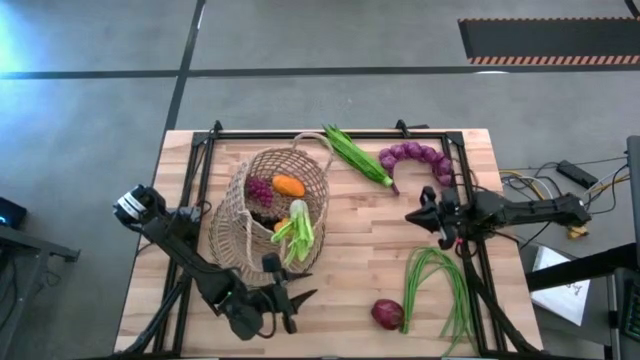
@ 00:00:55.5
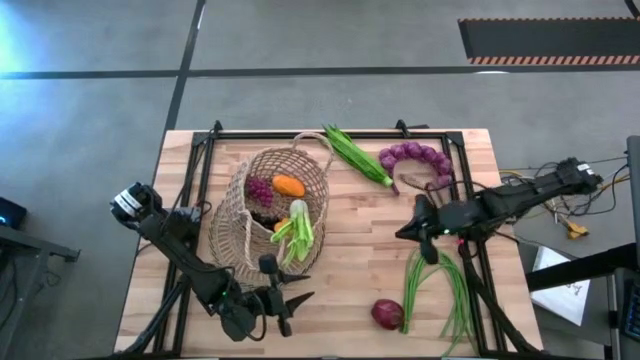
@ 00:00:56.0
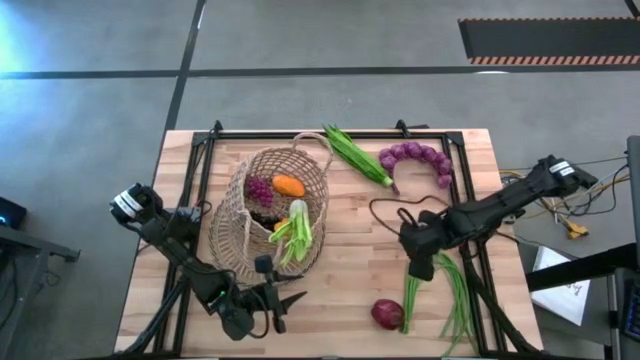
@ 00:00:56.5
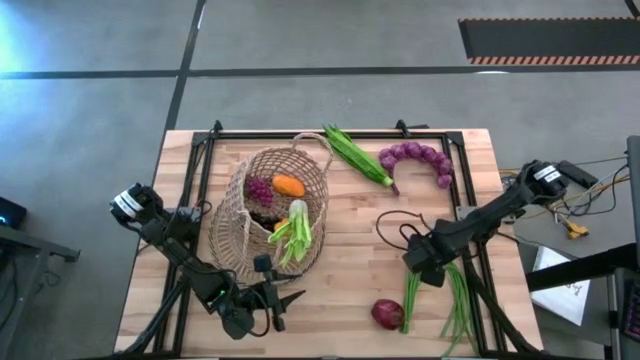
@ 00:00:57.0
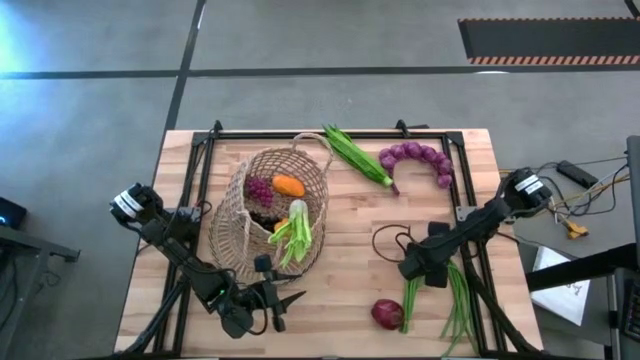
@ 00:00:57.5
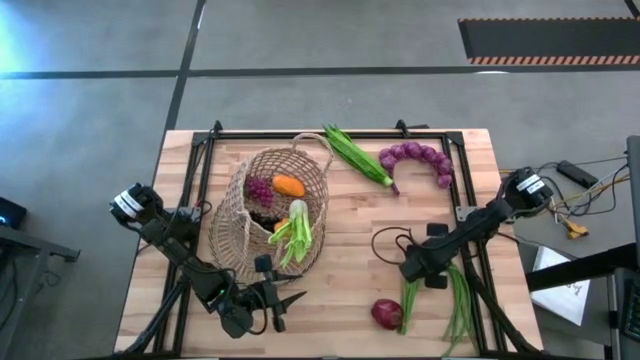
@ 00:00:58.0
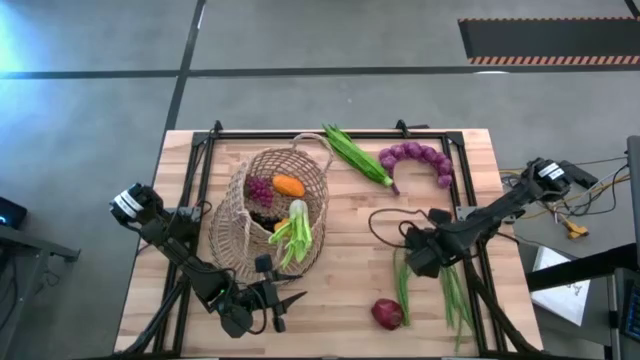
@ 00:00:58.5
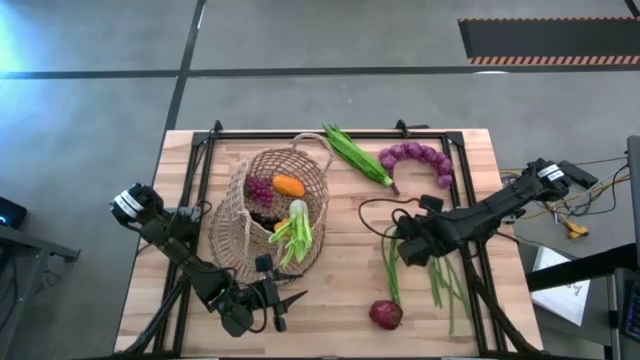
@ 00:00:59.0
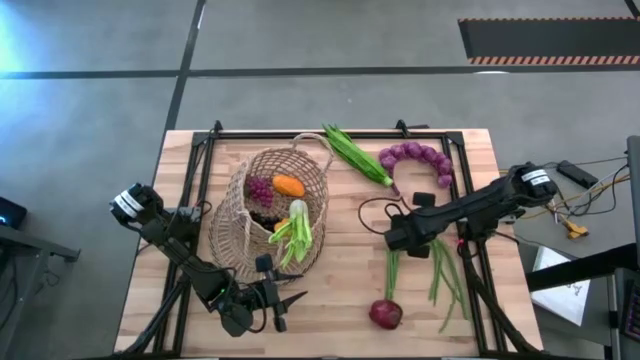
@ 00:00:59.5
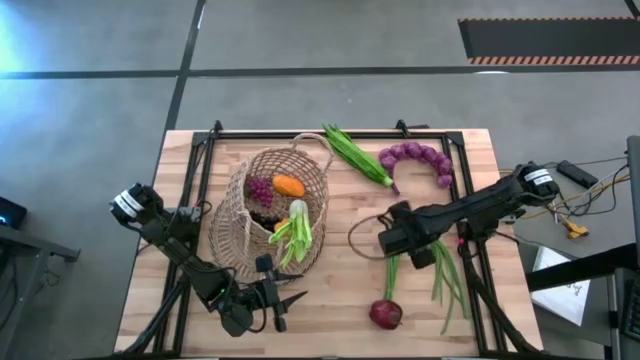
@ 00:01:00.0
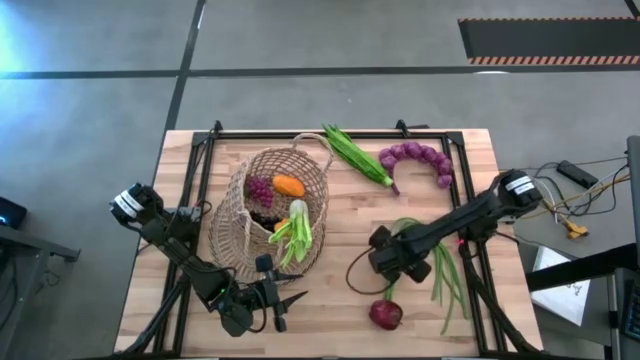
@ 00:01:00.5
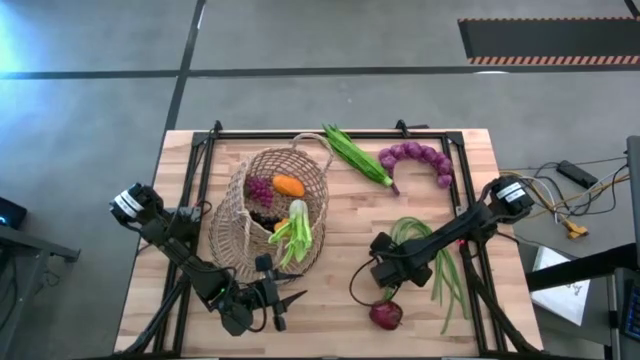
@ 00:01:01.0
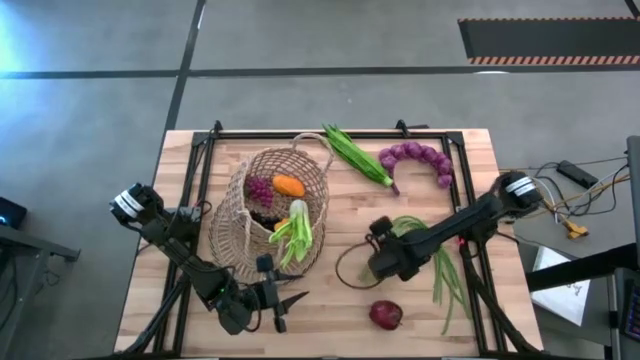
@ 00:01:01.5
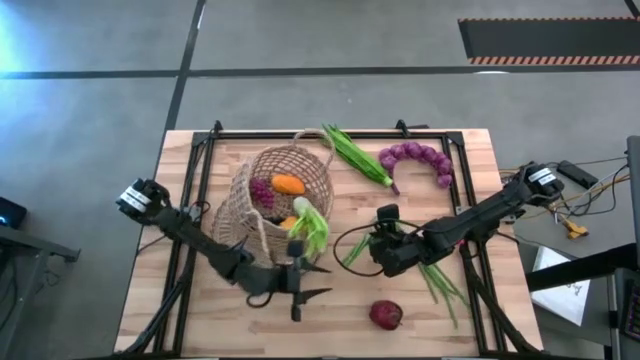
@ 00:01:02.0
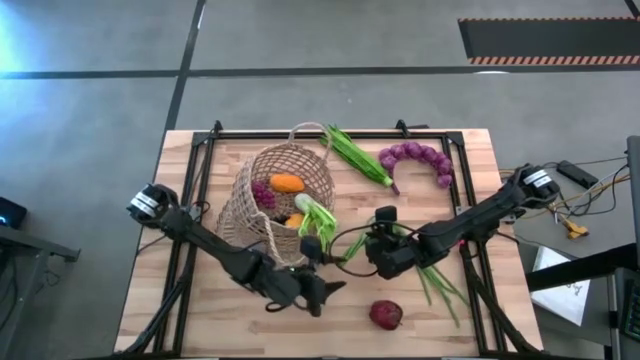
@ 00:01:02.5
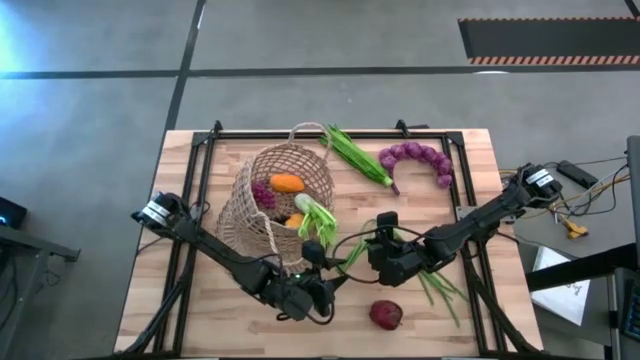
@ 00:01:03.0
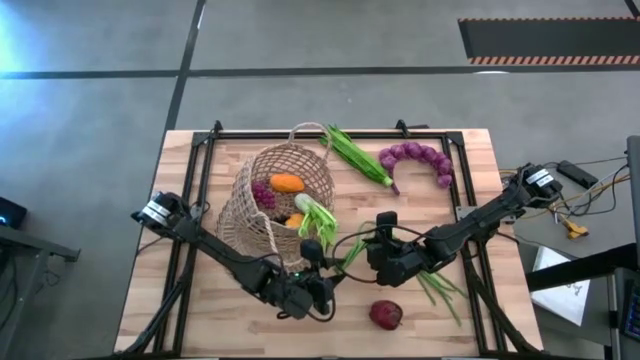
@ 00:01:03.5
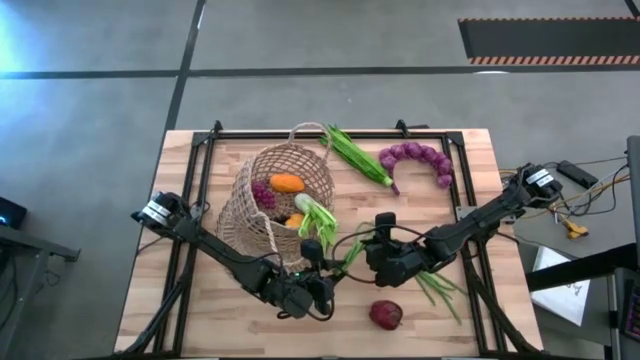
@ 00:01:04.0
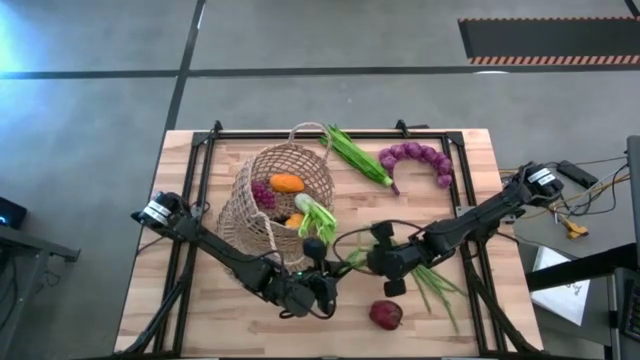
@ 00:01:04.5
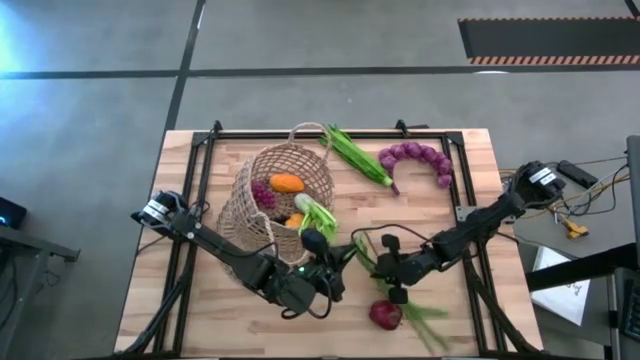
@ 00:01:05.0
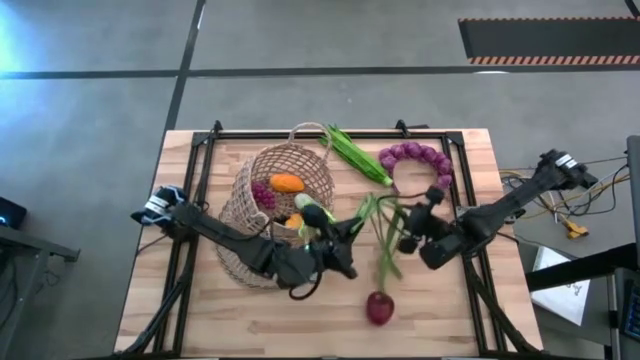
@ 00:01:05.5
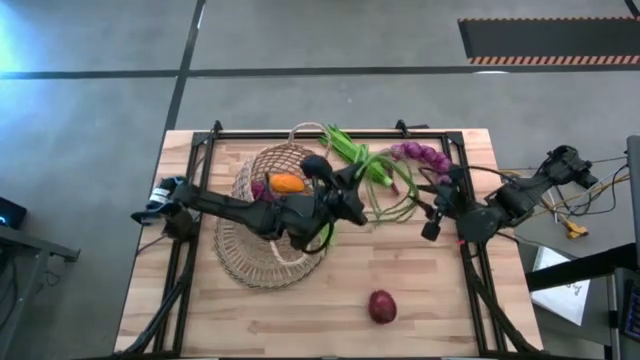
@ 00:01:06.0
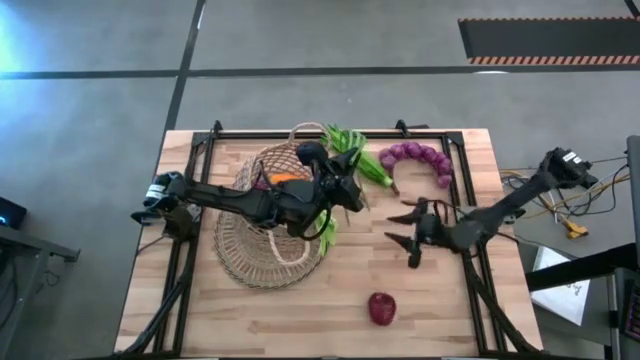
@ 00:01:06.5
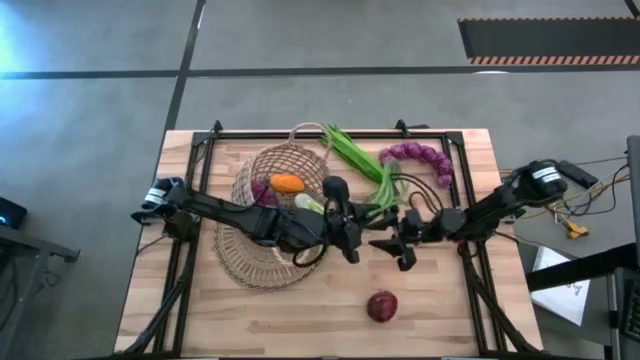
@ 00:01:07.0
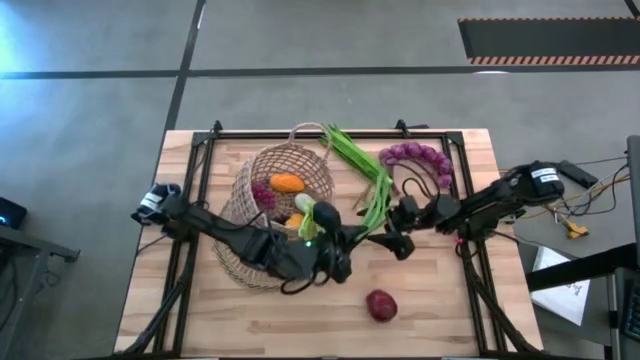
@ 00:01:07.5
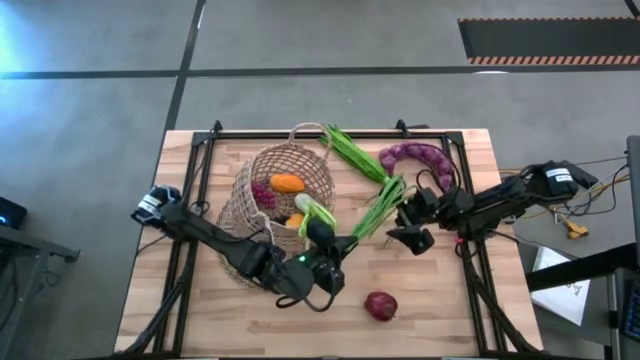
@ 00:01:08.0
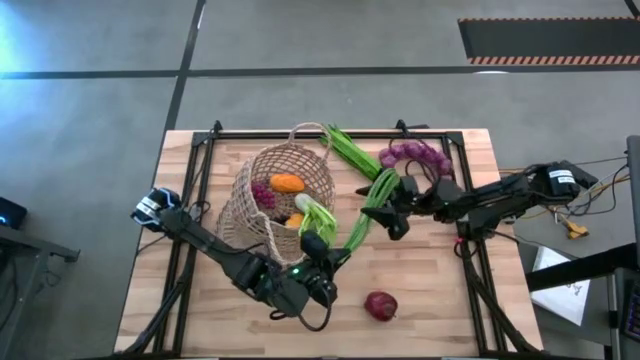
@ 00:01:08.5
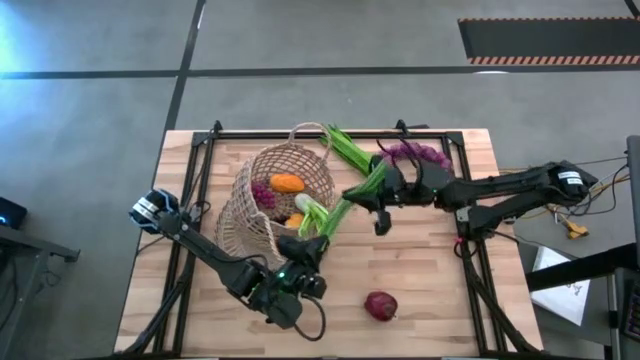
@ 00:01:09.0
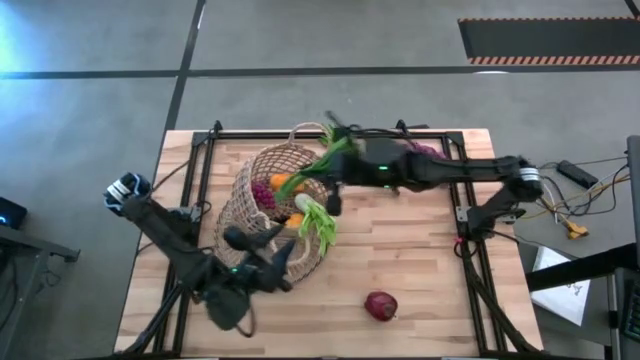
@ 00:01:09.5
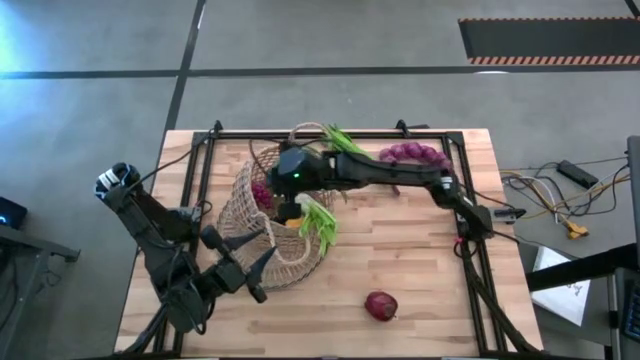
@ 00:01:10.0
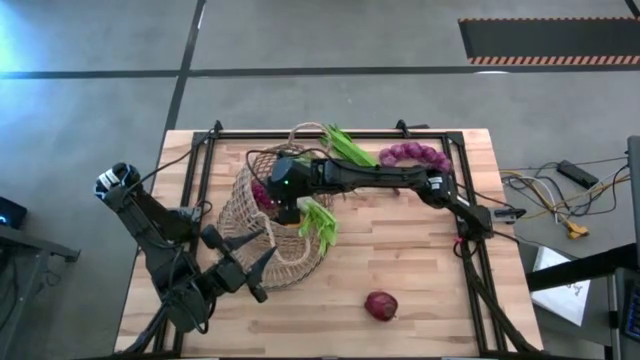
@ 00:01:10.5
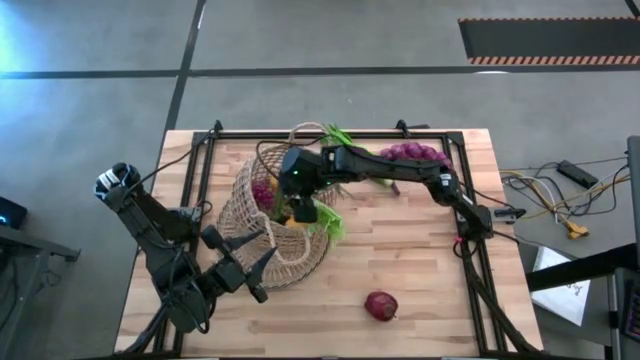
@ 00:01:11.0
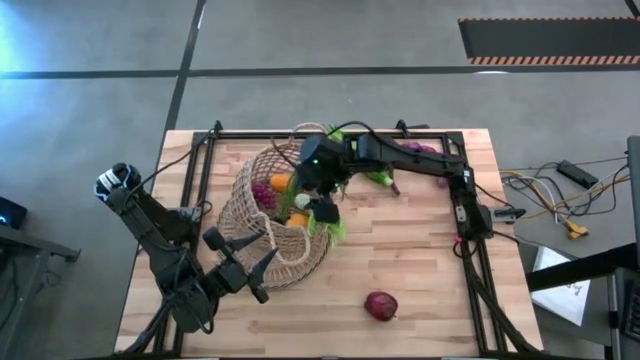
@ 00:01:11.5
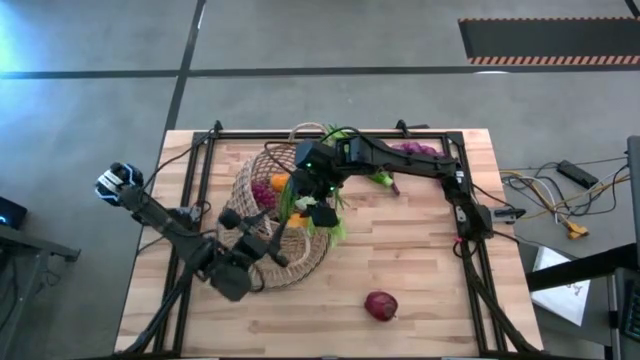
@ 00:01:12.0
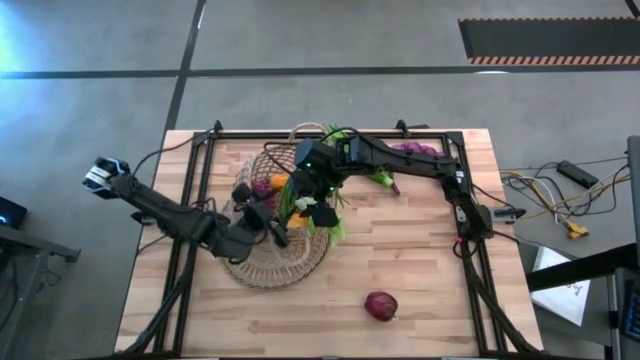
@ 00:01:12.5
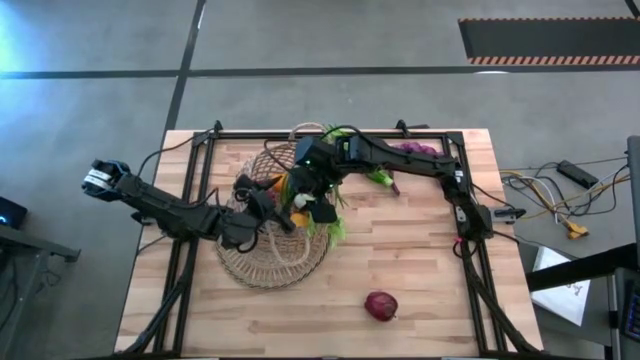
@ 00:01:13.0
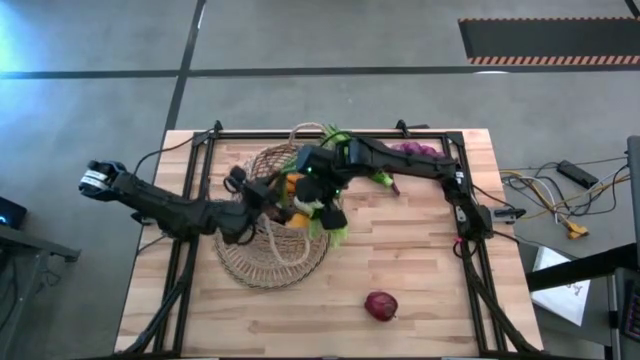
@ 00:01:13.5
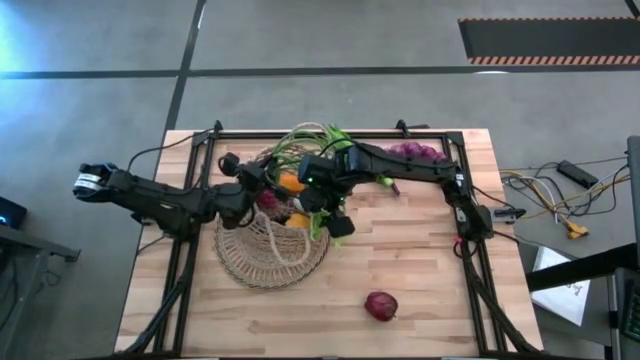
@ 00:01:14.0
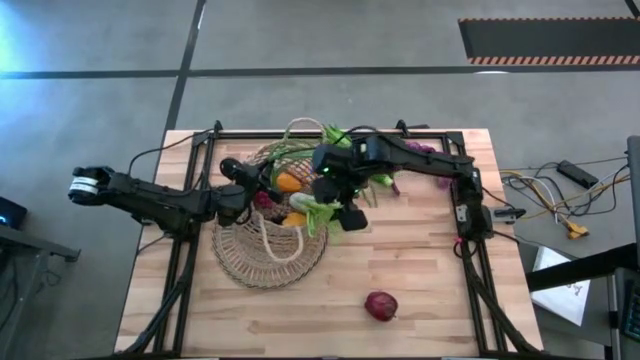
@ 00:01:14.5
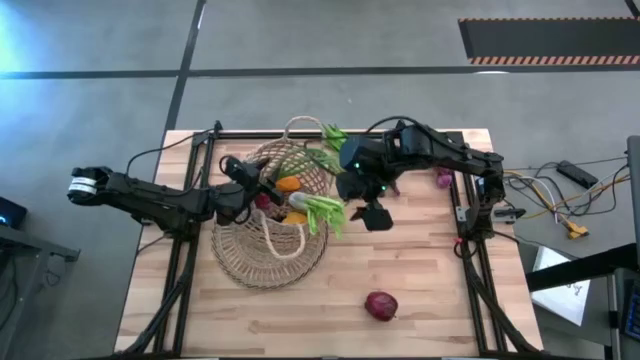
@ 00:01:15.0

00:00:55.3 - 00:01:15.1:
Task: Build produce basket
Put the green beans into the basket
